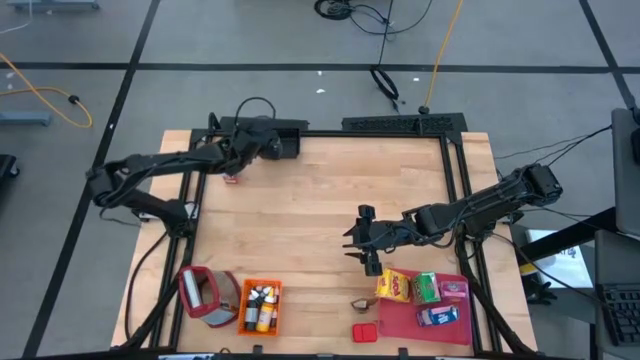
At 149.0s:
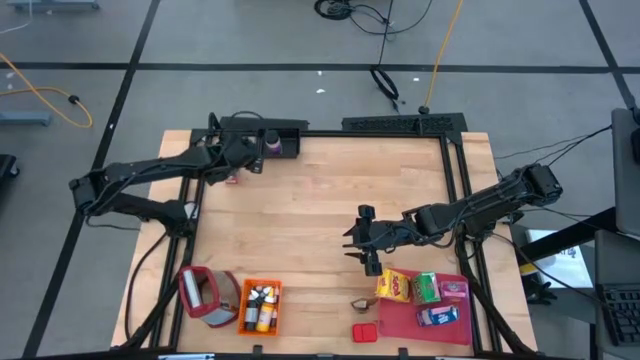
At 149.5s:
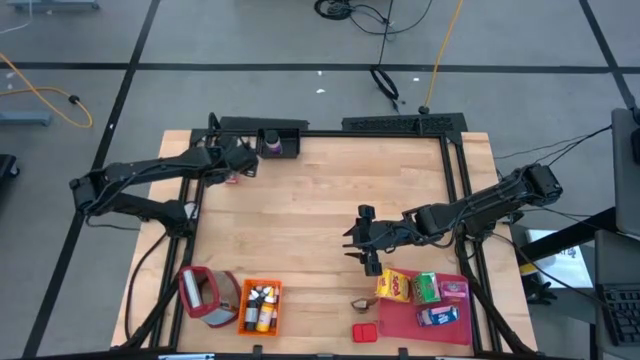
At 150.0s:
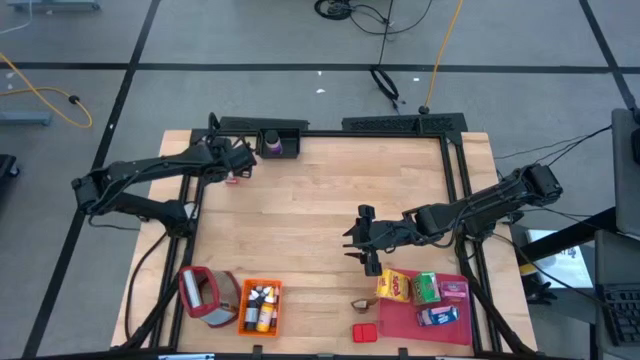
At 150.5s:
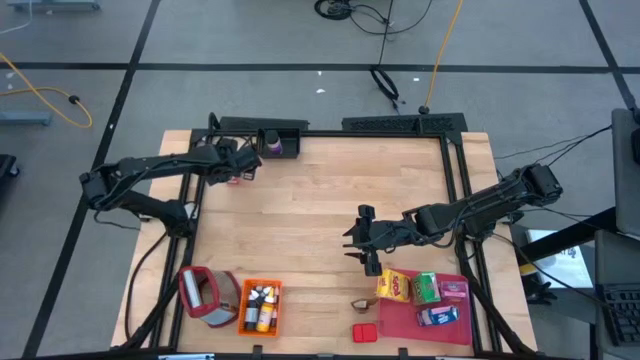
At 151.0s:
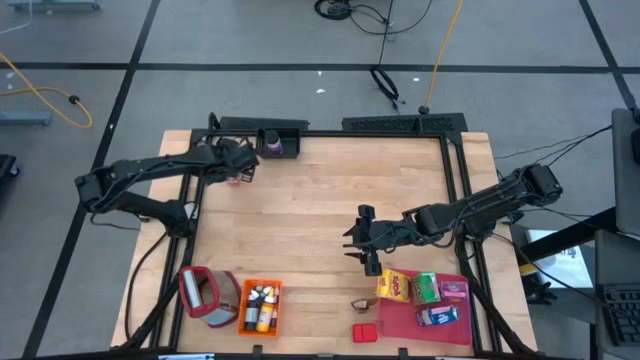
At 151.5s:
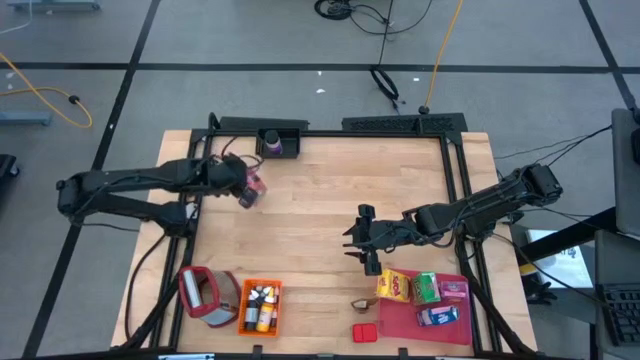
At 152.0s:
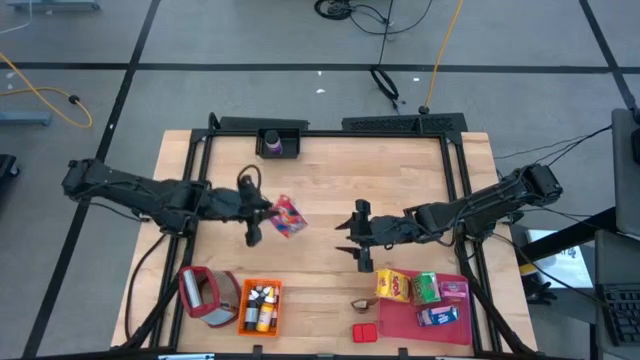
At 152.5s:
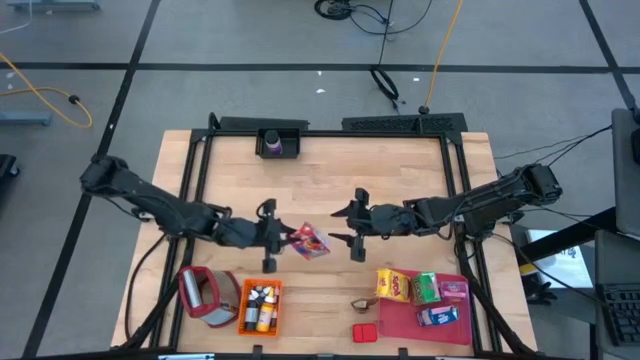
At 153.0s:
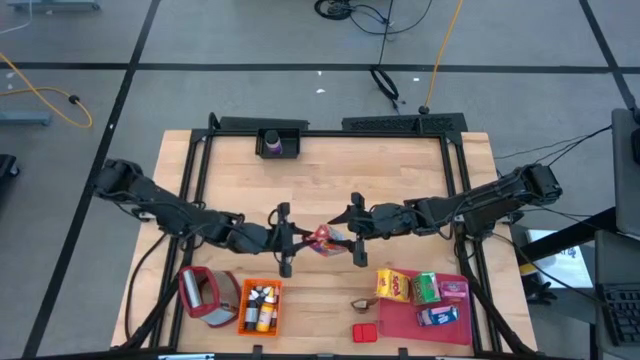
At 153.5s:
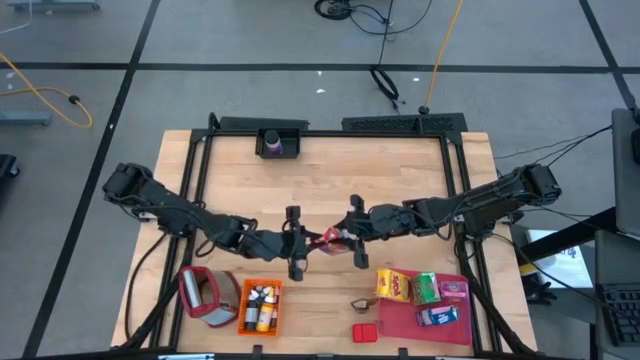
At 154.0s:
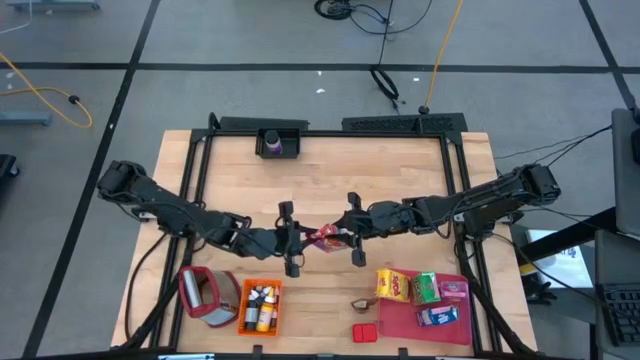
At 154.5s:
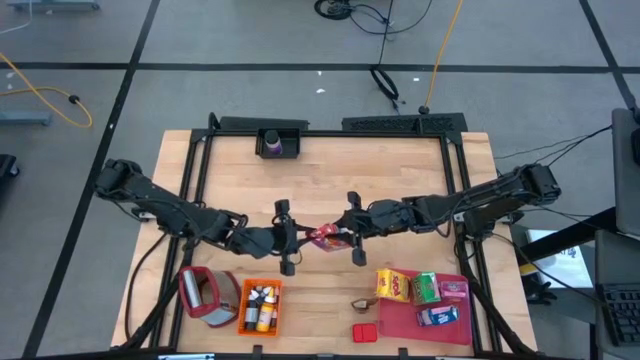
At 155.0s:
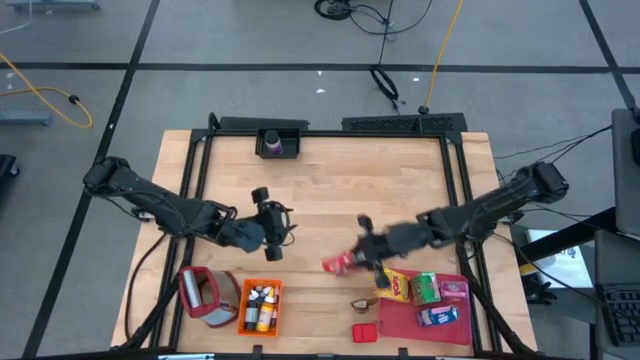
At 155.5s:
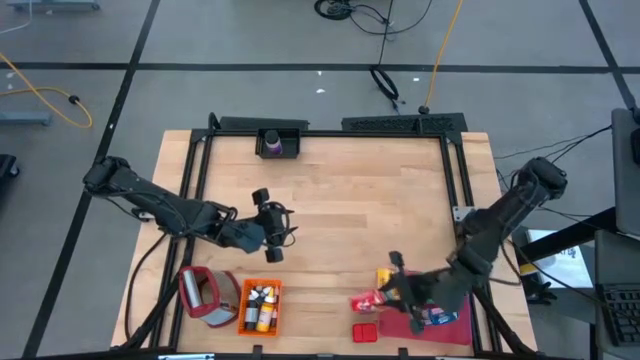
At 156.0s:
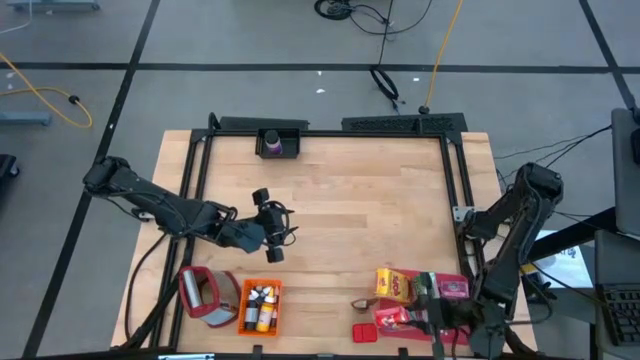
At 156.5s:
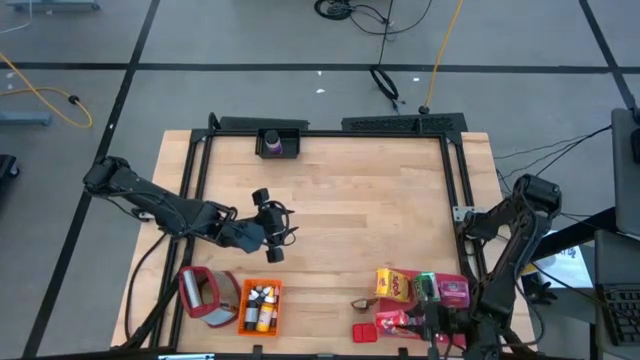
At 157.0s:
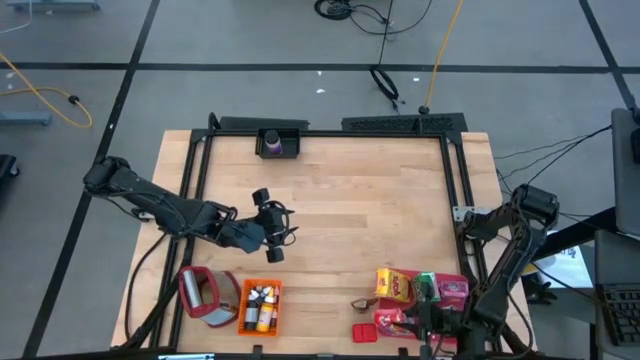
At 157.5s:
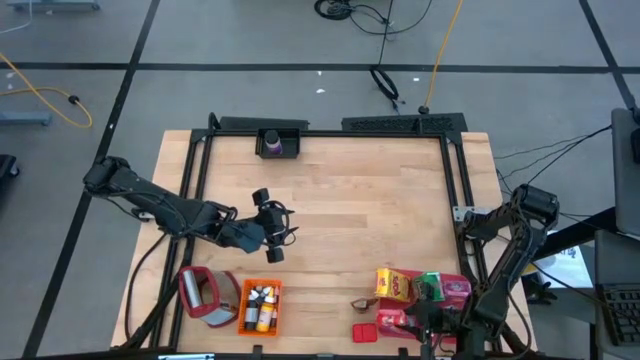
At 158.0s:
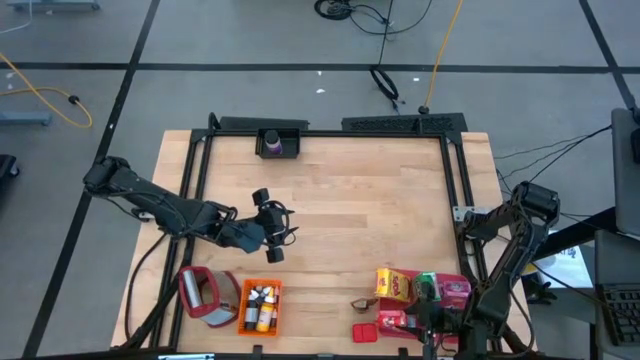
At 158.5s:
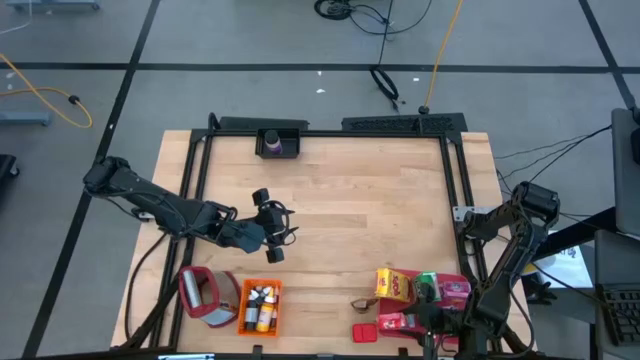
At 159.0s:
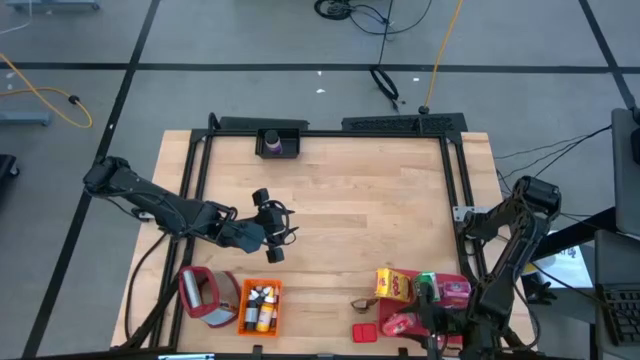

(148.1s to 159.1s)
Task: Pick & Place Kitchen Items
Put the red cereal box into the red bin

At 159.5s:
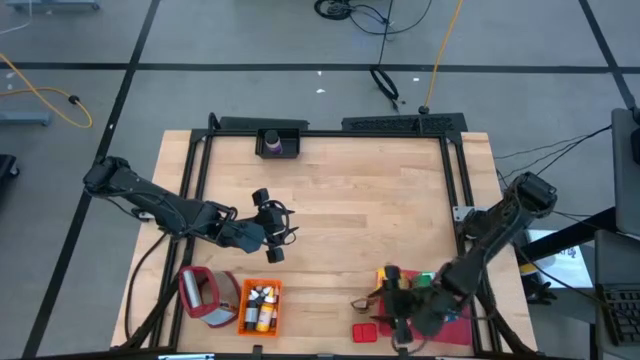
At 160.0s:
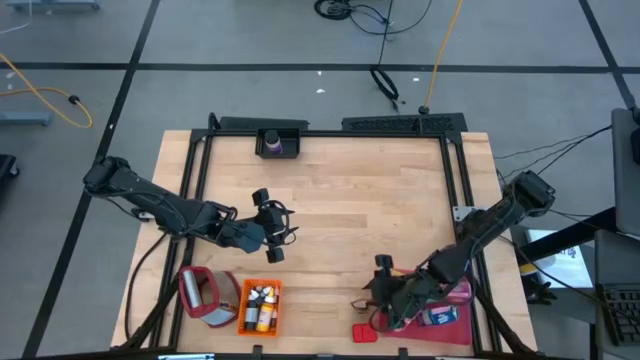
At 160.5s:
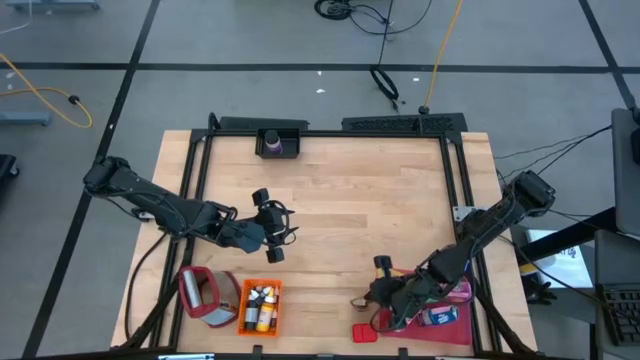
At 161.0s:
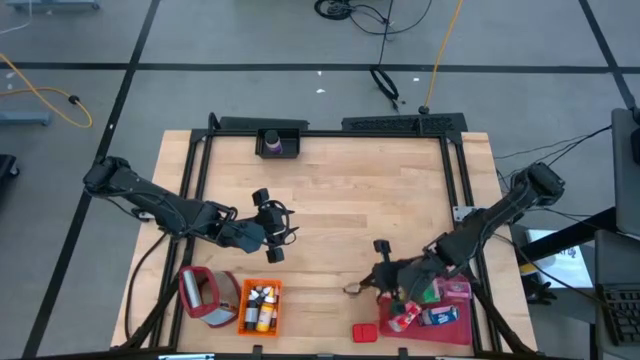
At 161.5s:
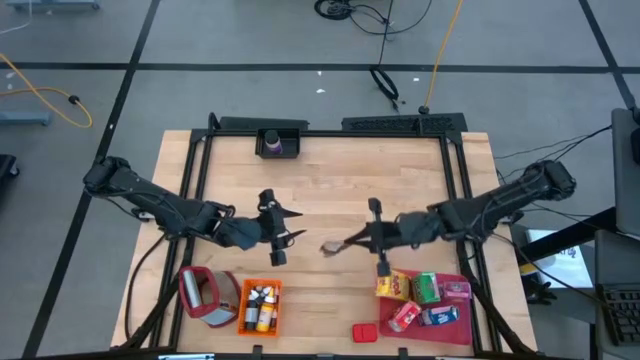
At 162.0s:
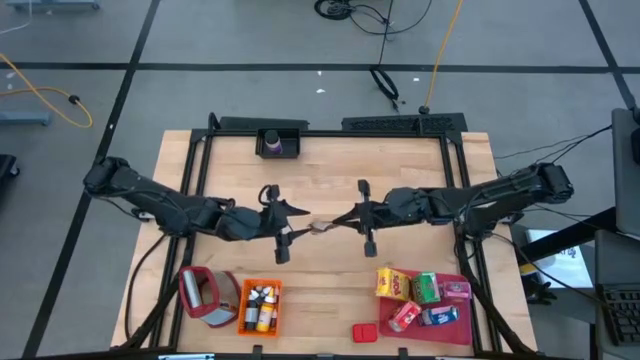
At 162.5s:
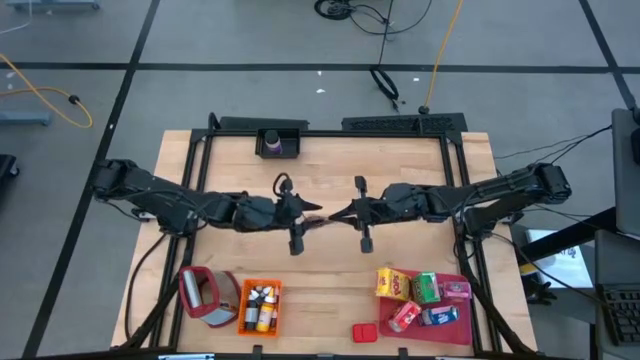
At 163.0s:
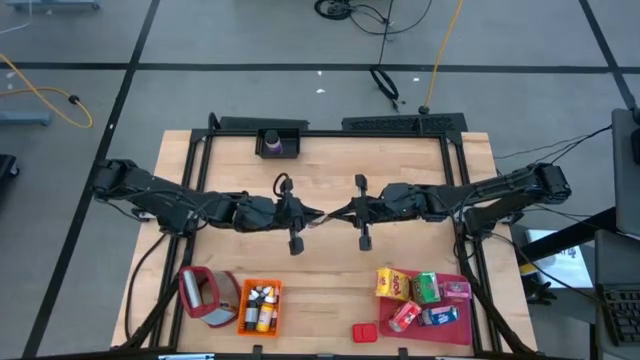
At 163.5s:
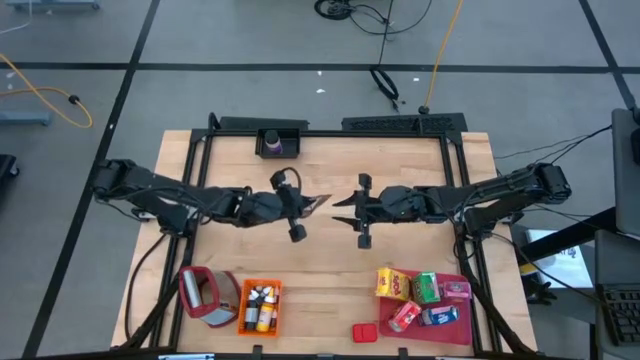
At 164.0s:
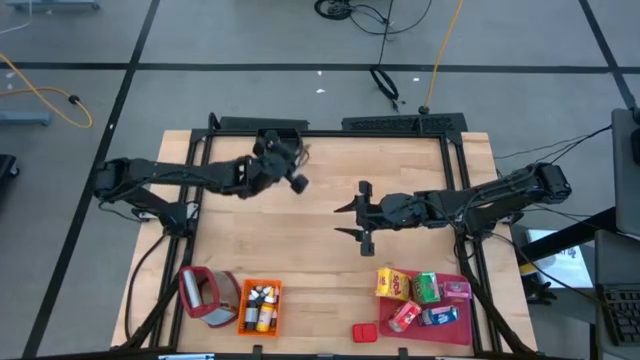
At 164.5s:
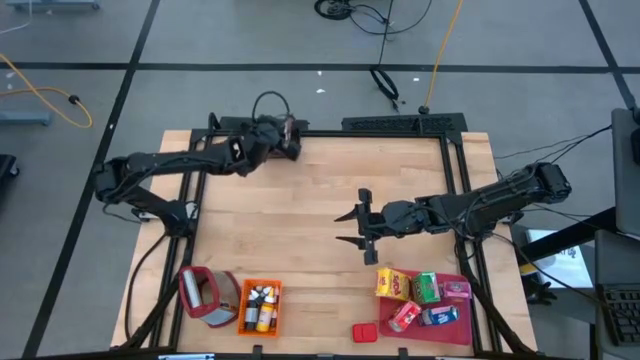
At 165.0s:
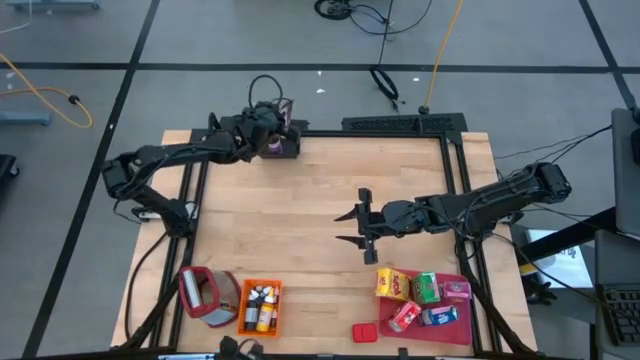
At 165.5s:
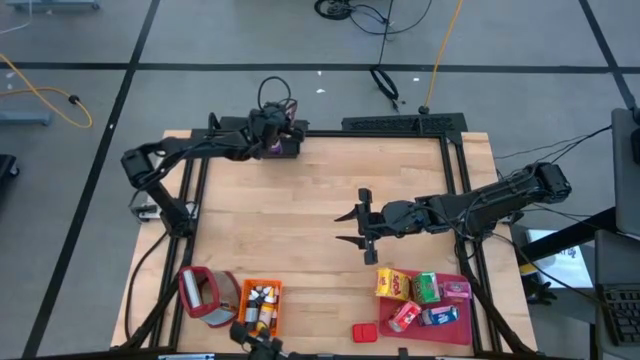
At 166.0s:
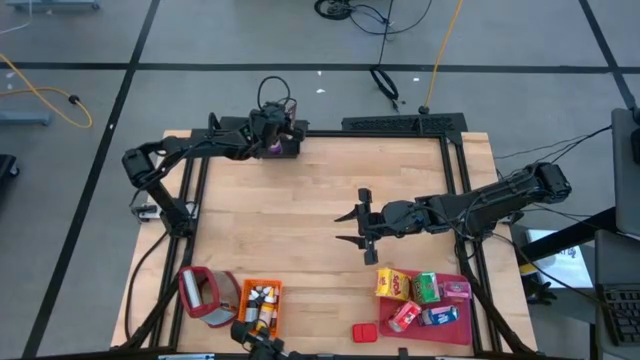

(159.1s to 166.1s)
Put the orange seasoning pack into the black bin

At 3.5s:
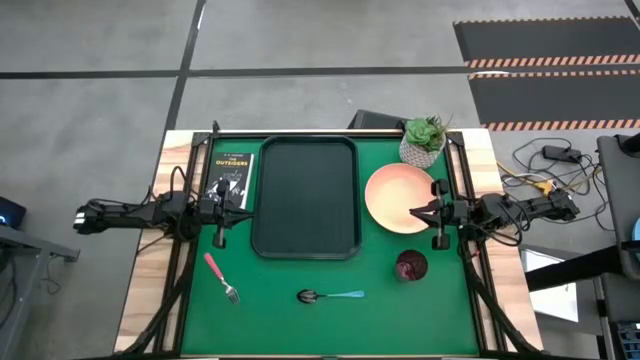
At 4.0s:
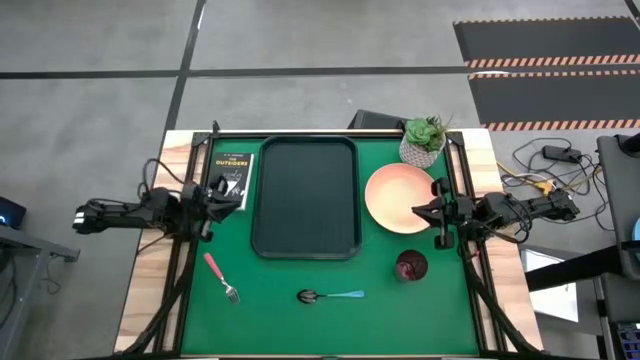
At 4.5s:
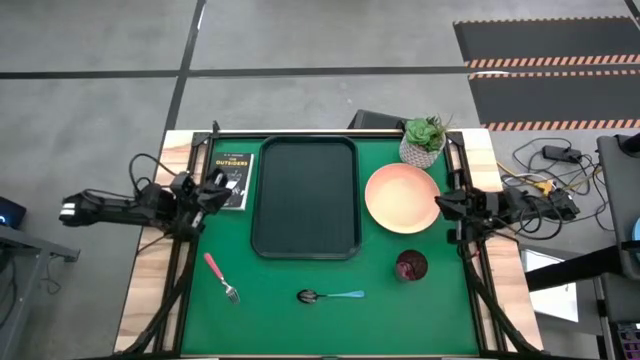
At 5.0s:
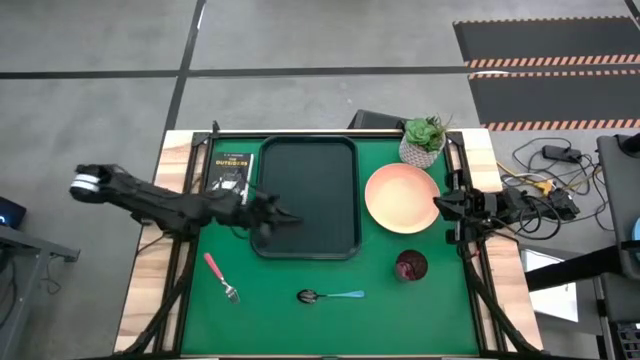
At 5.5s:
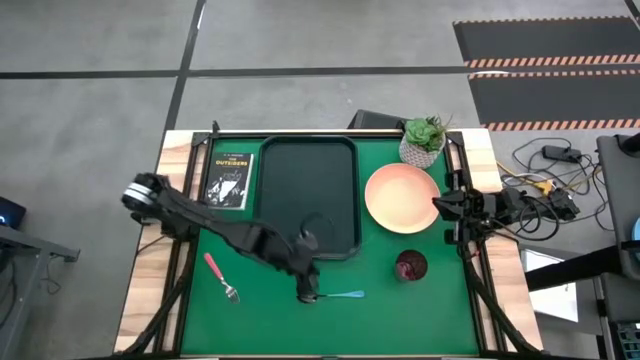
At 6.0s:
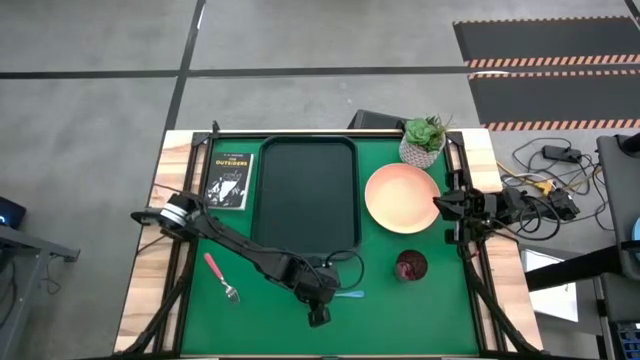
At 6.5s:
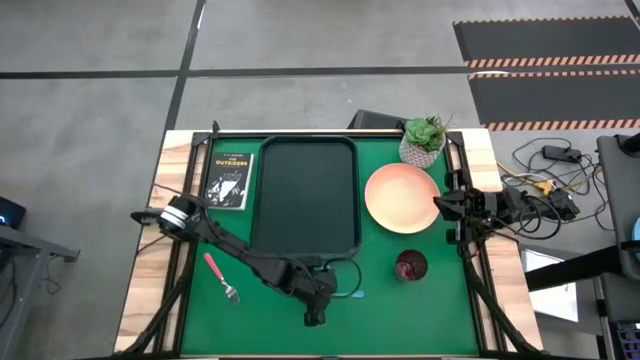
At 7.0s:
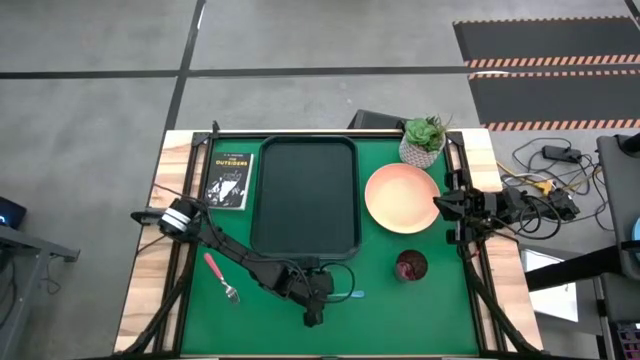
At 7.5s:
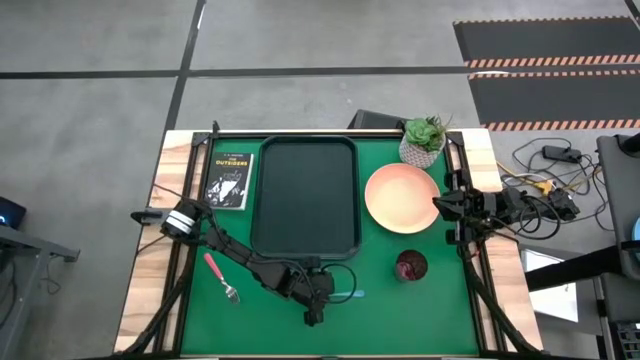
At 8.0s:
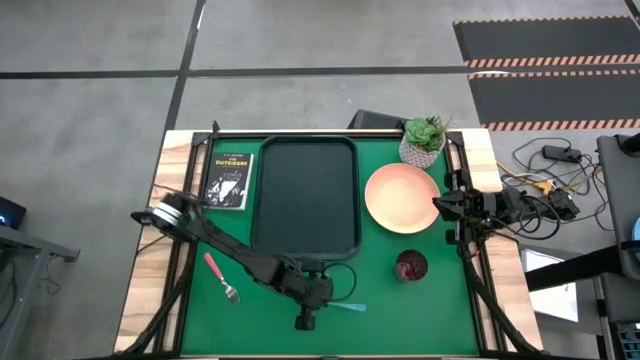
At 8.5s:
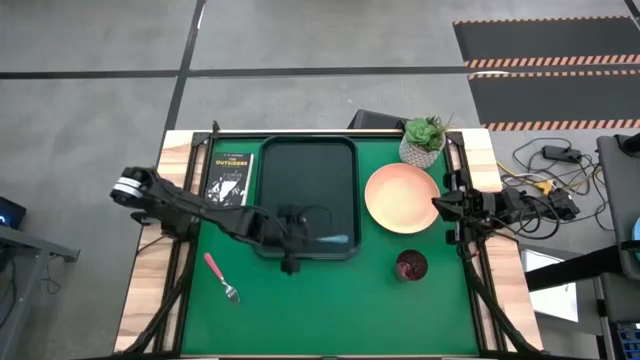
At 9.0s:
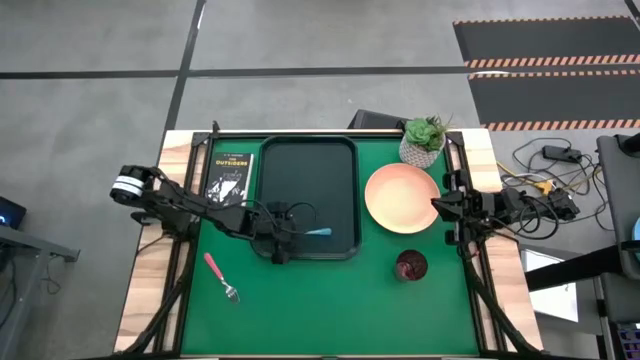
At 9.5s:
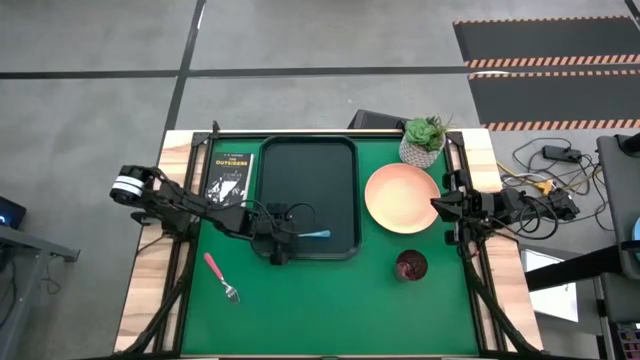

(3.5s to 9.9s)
Task: Pick and place plate/cup/fork/spoon on tray
Put the blue spoon on the bottom of the black serving tray
